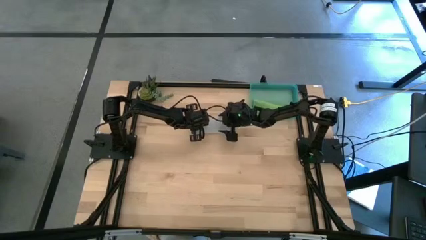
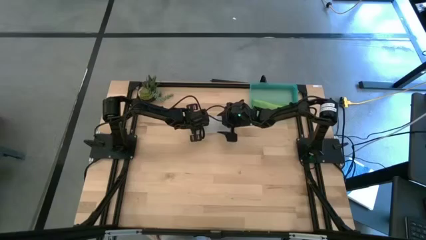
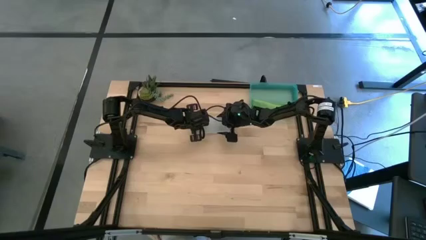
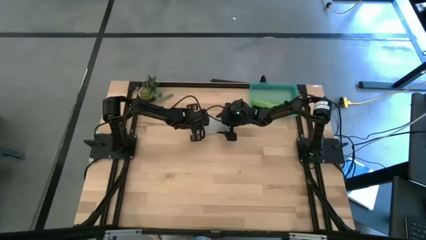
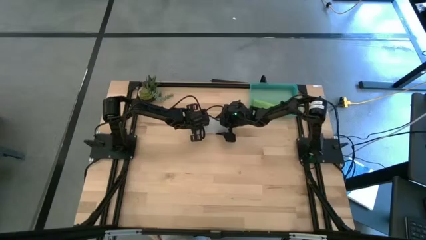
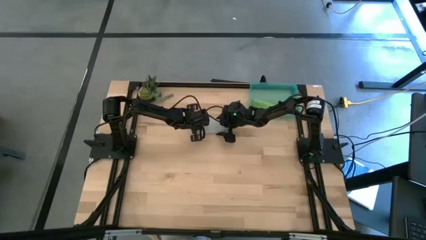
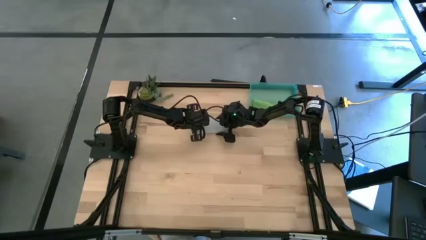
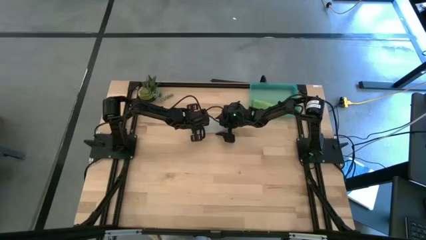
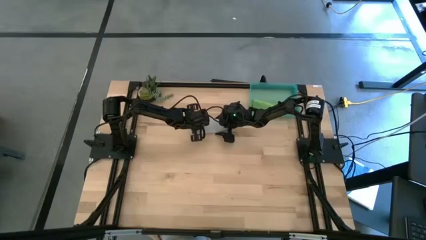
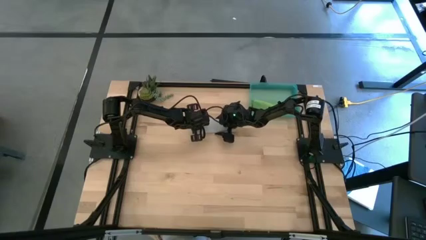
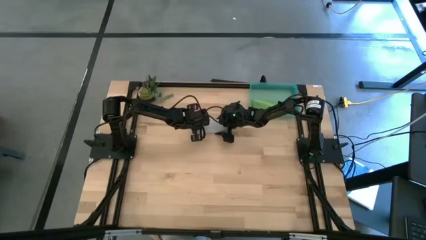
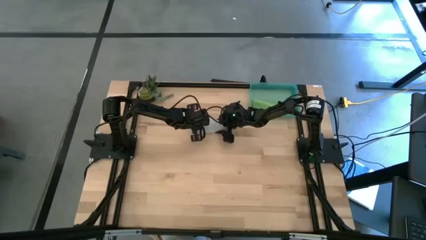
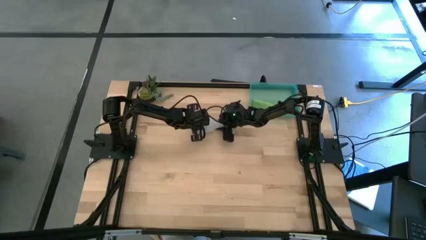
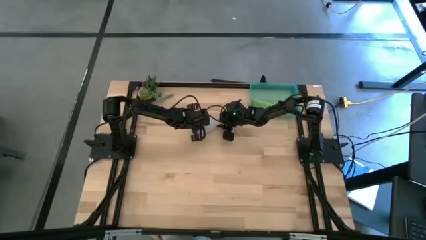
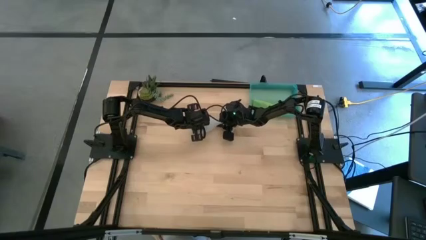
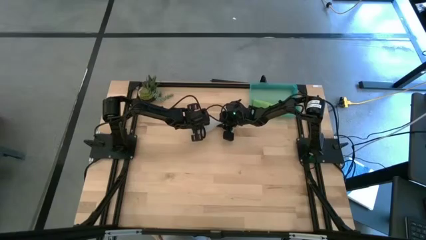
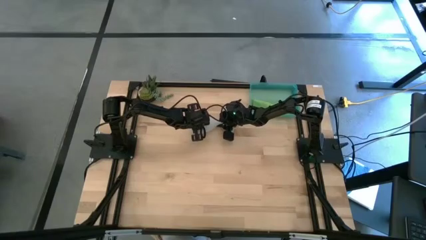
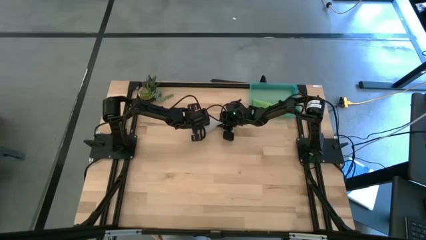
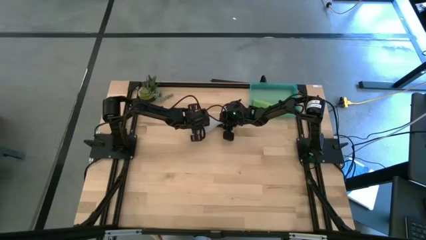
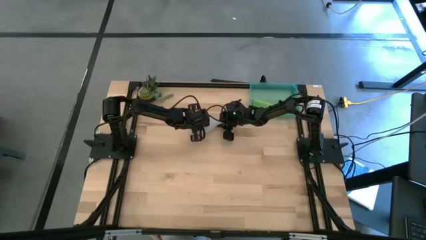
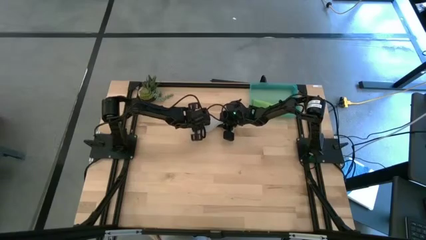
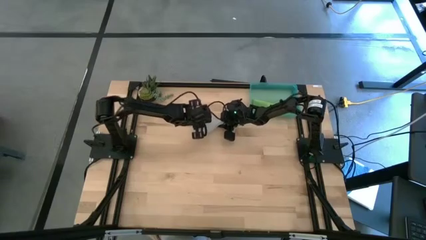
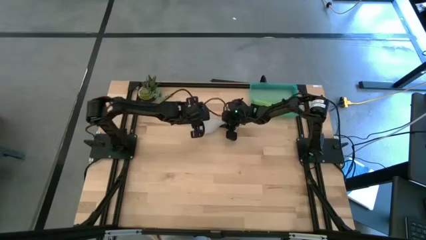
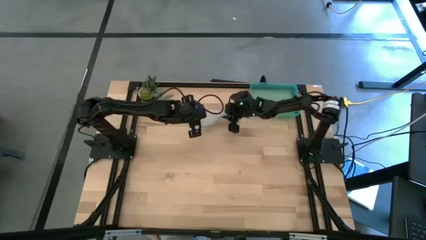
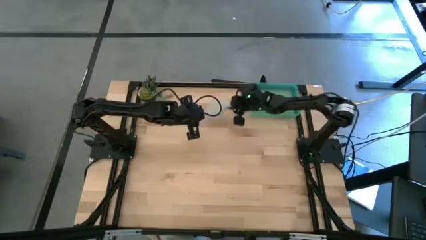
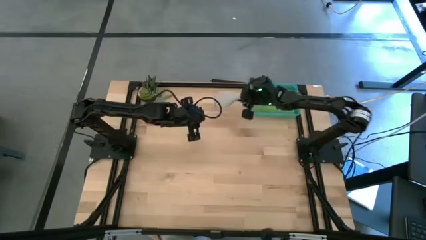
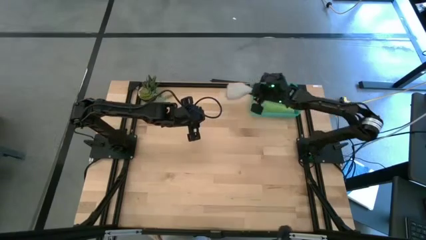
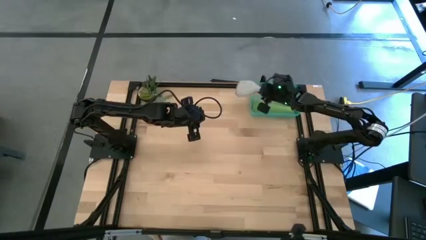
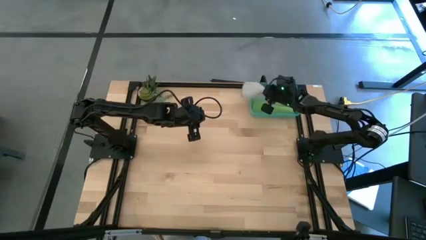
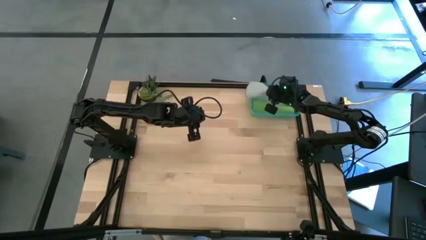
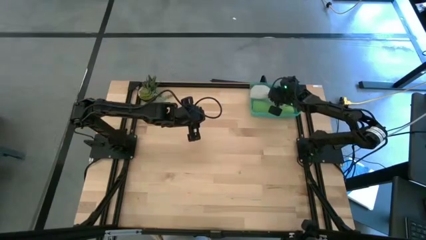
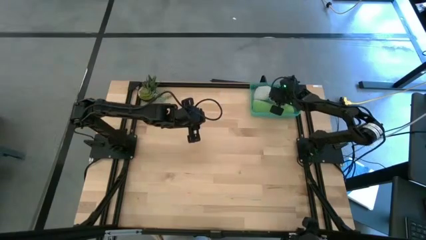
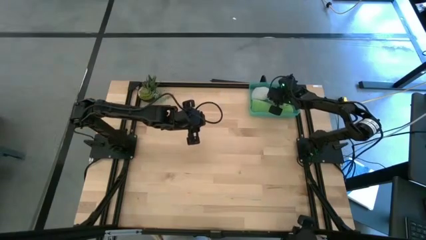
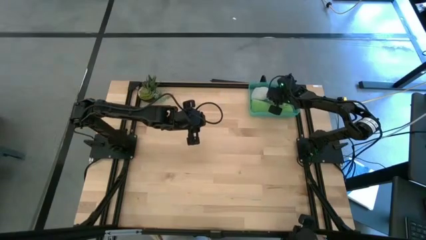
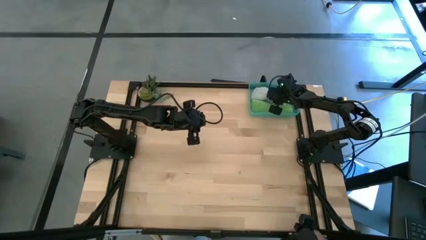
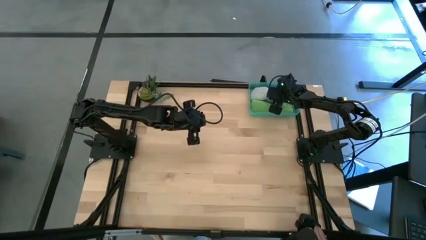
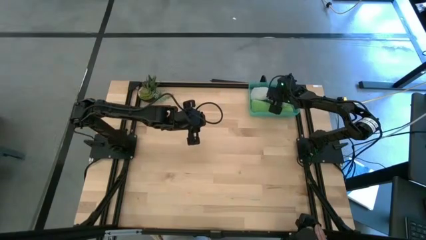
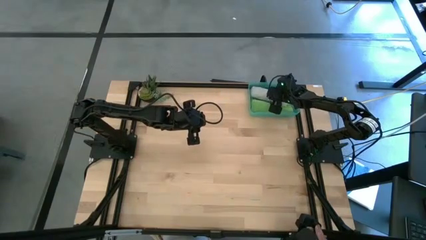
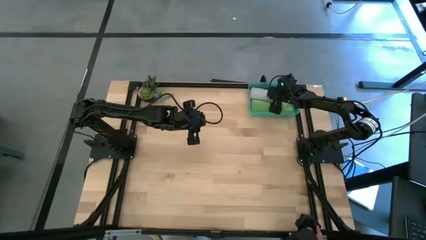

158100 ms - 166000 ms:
Task: Roll microfiber towels into tight, uniform cylinder then place into a basket
Put the gray microfiber cloth into the blue bin

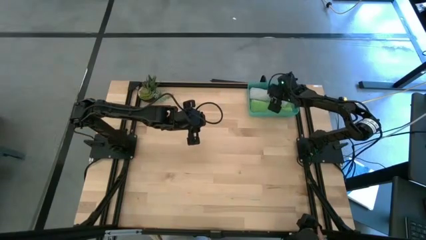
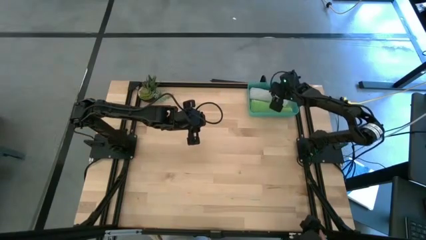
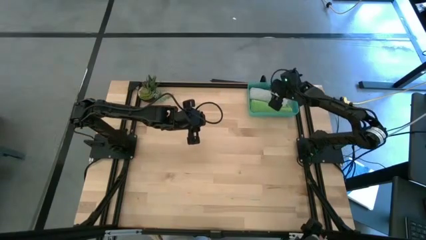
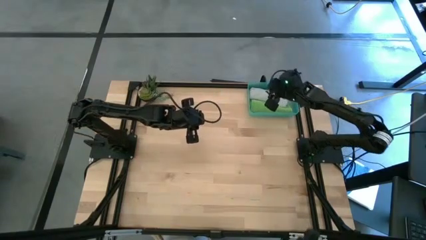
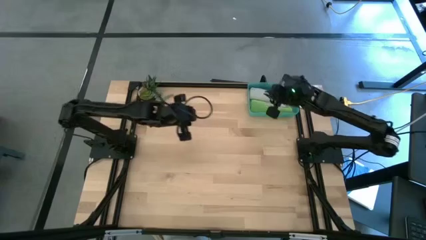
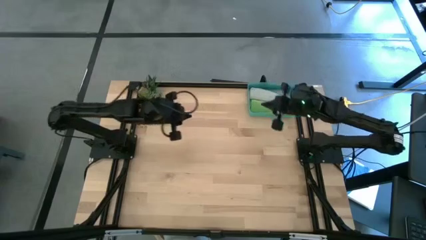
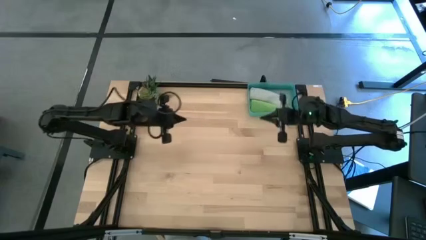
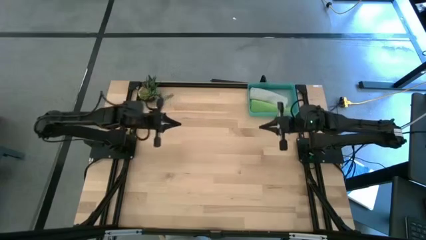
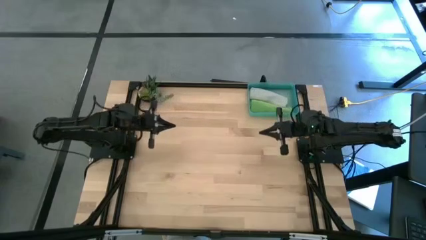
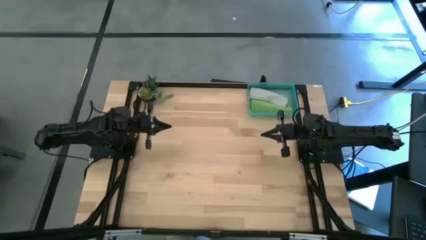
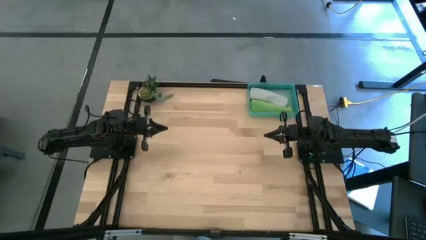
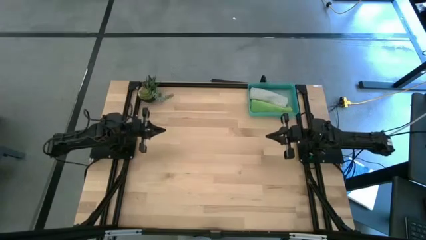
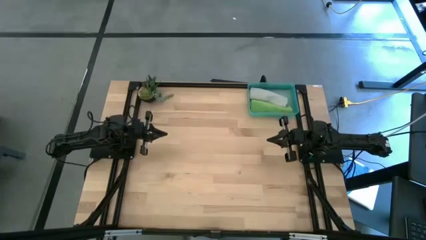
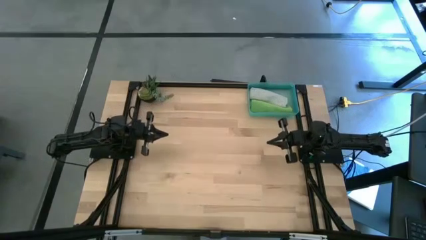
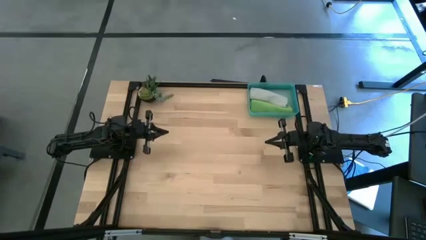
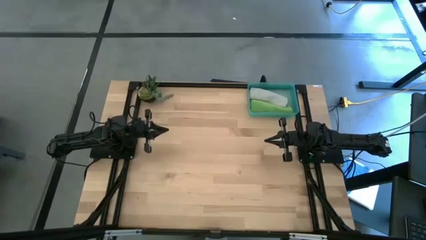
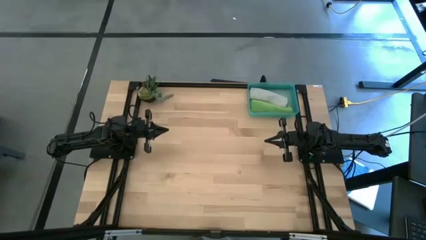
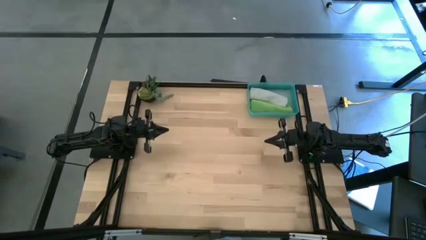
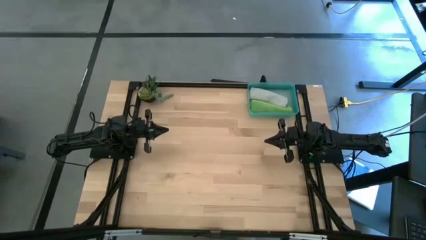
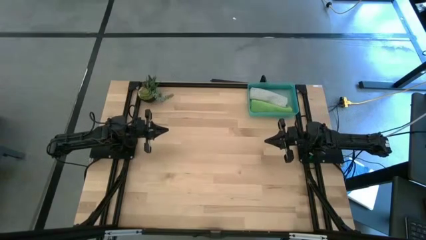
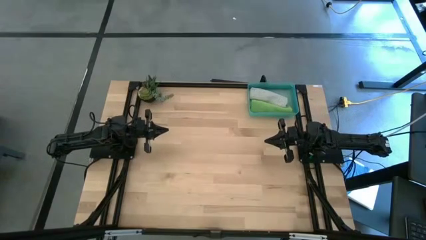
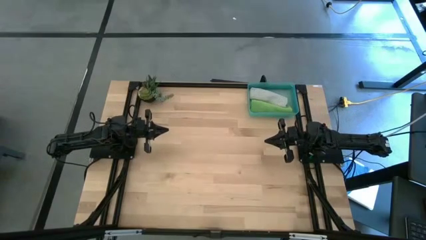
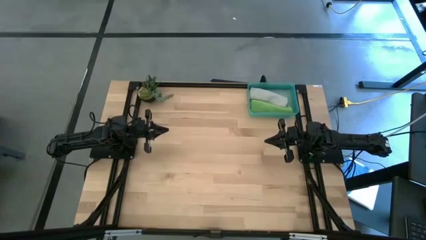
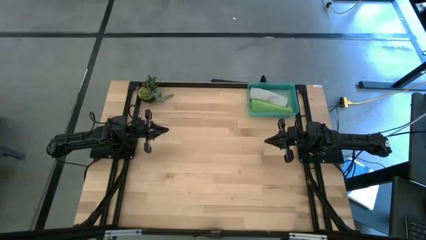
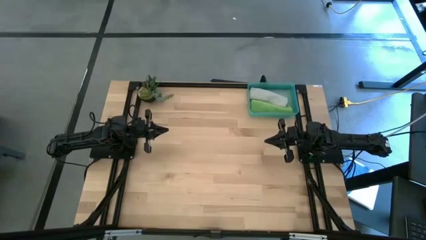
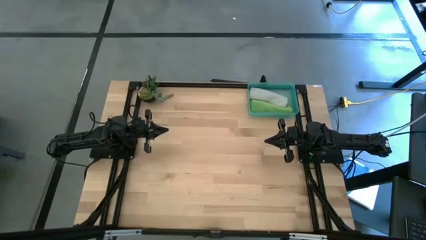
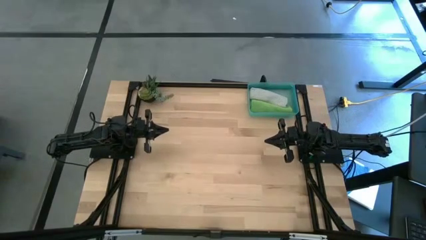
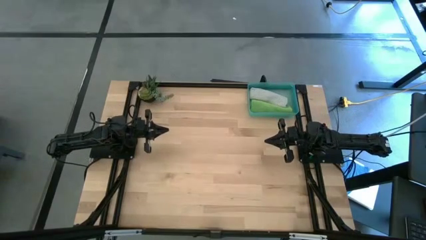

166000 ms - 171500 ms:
Return to Home Position
